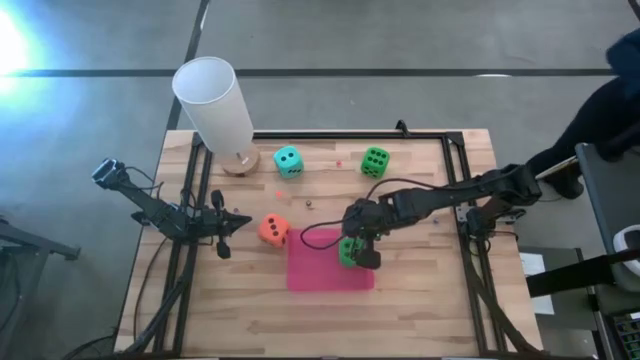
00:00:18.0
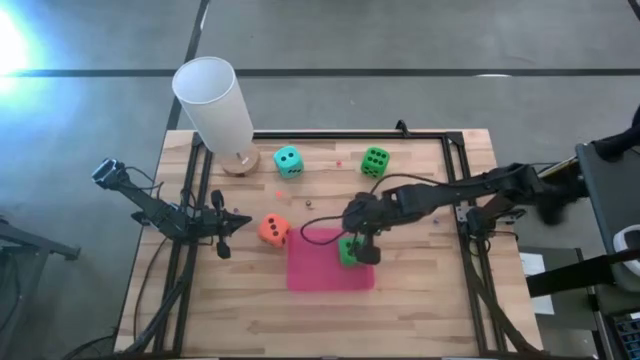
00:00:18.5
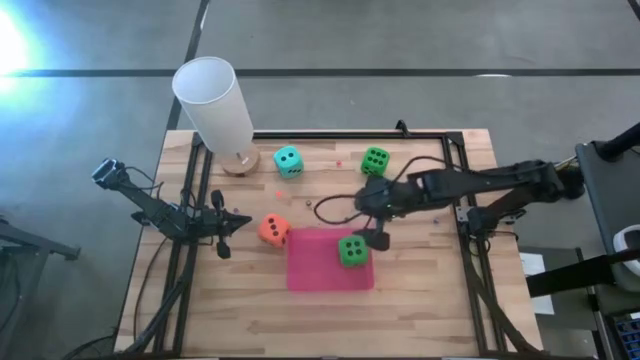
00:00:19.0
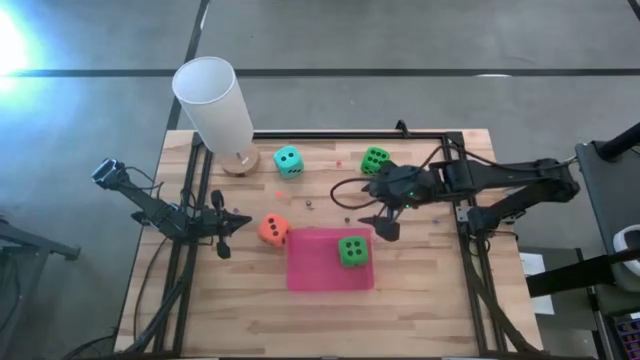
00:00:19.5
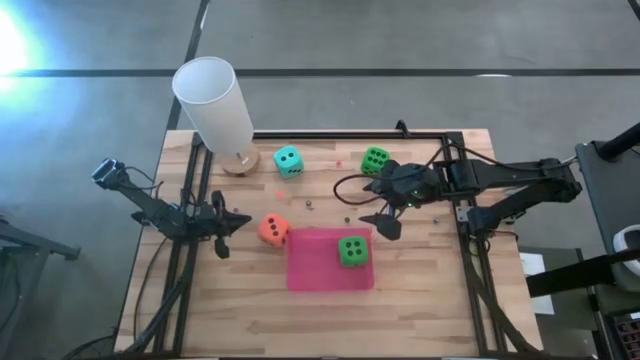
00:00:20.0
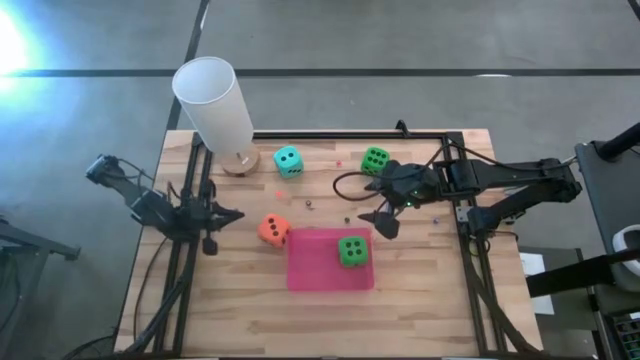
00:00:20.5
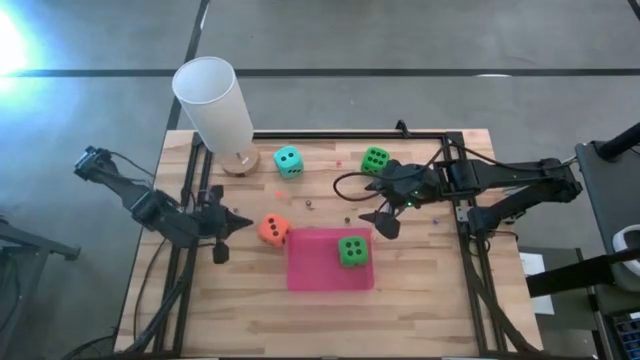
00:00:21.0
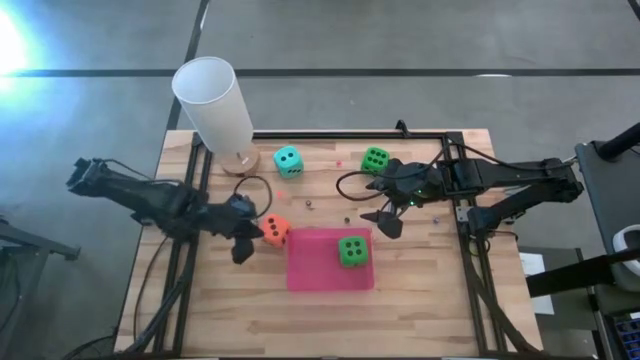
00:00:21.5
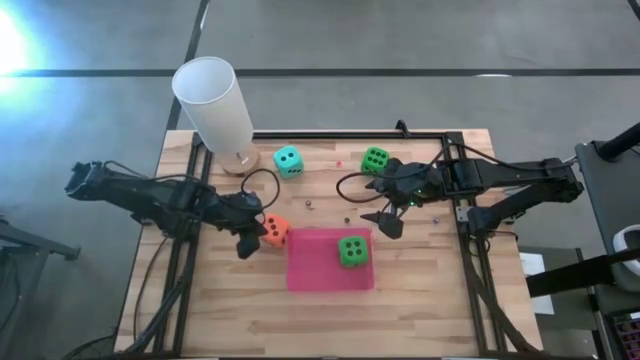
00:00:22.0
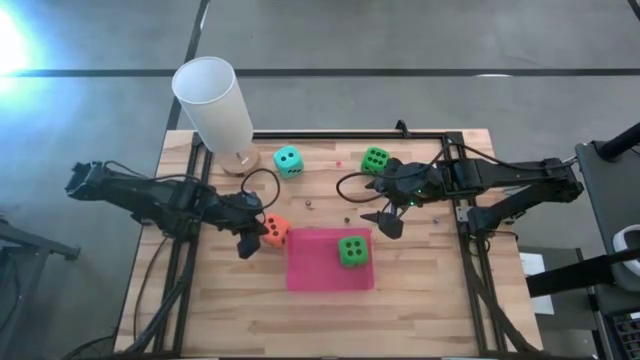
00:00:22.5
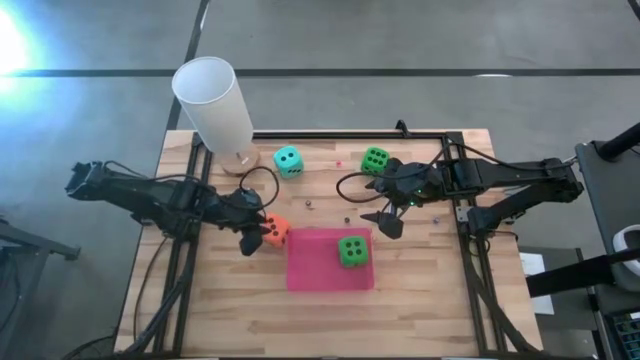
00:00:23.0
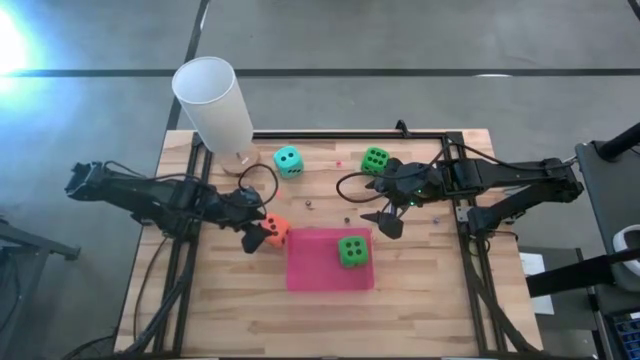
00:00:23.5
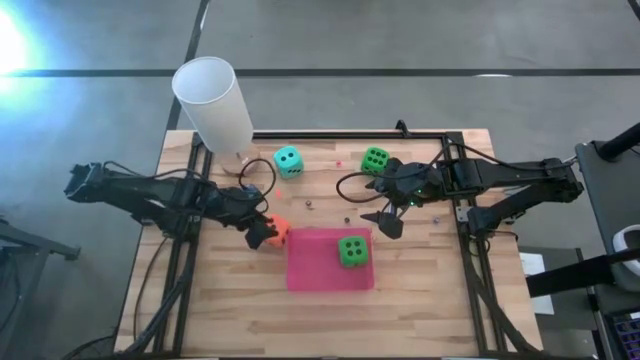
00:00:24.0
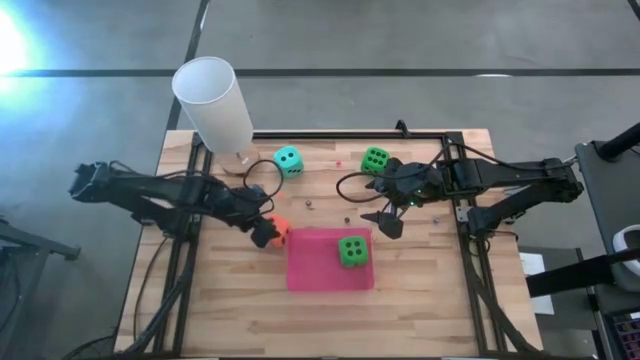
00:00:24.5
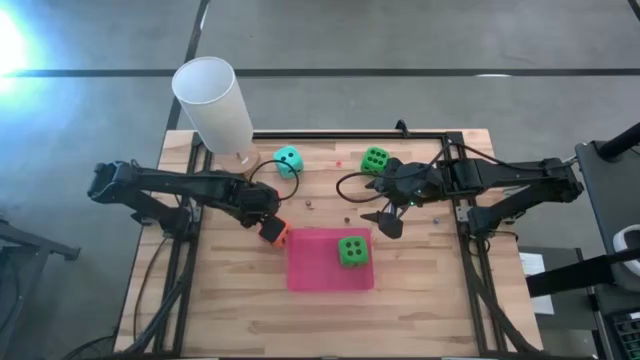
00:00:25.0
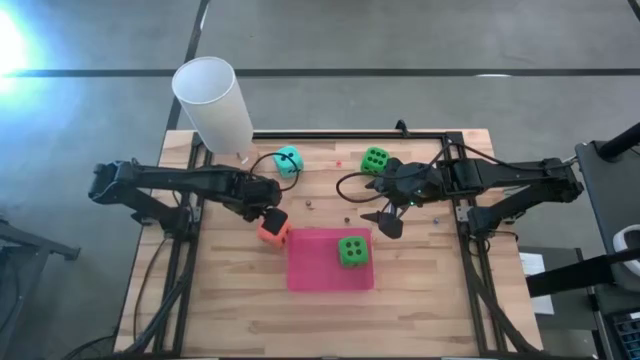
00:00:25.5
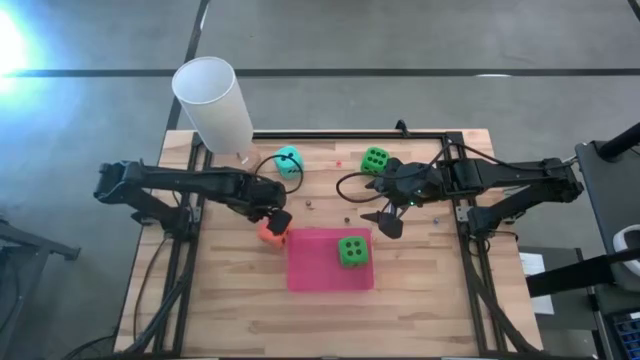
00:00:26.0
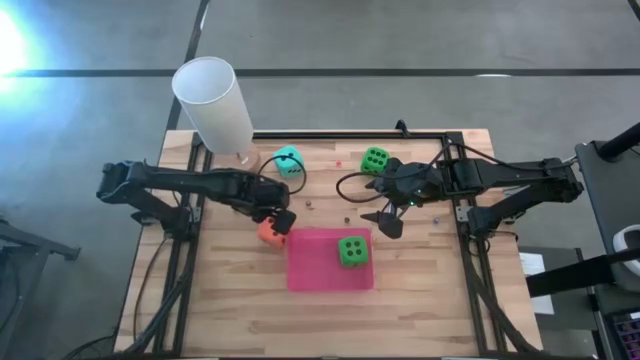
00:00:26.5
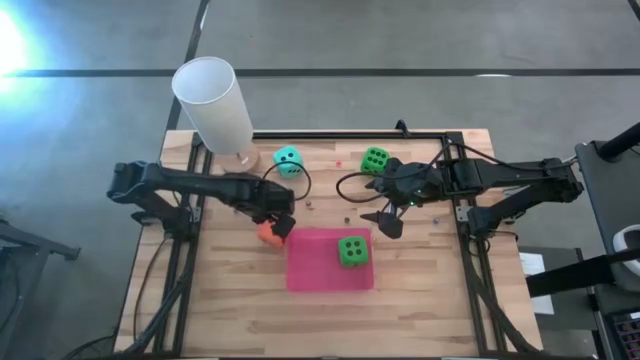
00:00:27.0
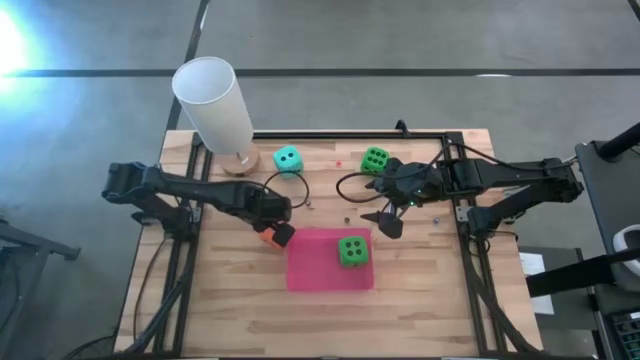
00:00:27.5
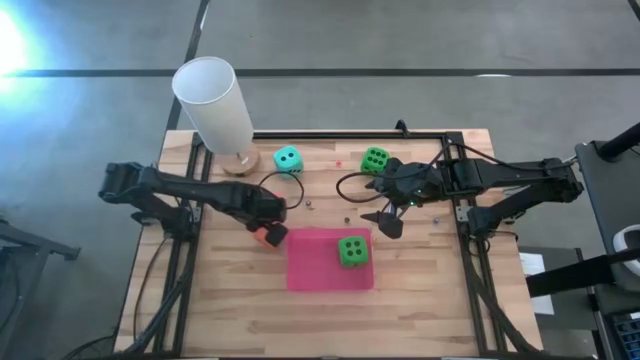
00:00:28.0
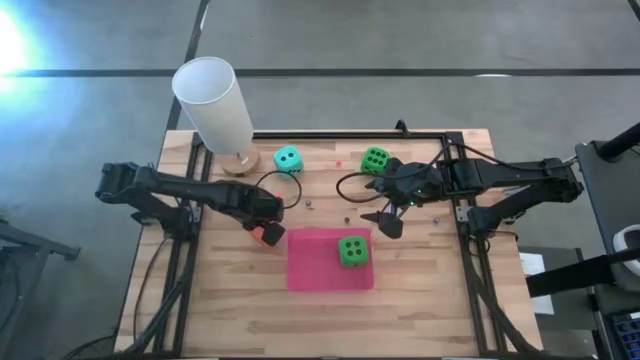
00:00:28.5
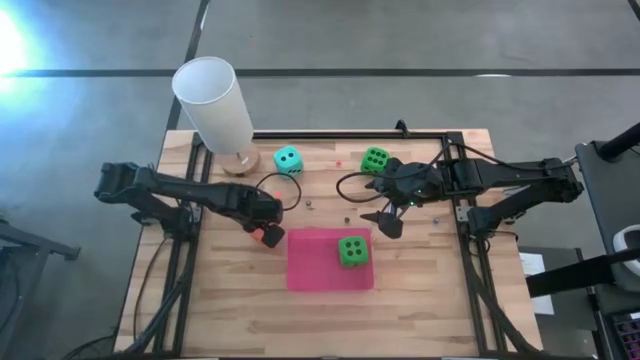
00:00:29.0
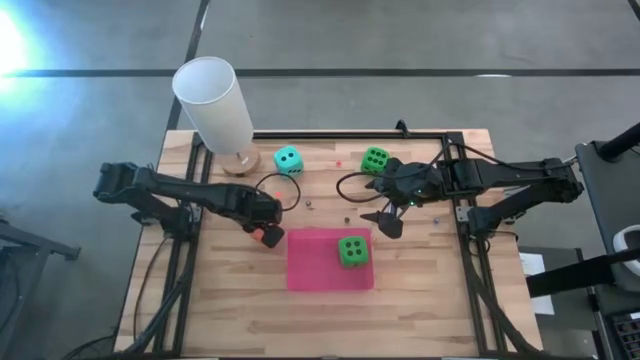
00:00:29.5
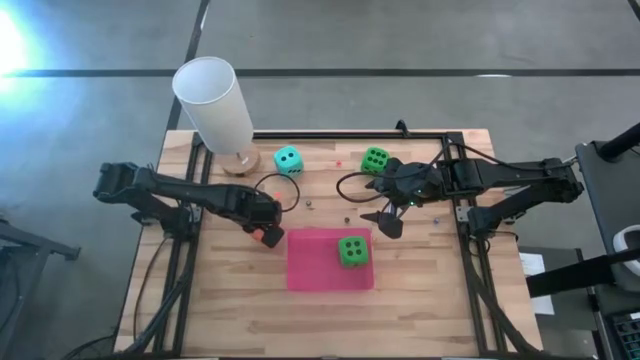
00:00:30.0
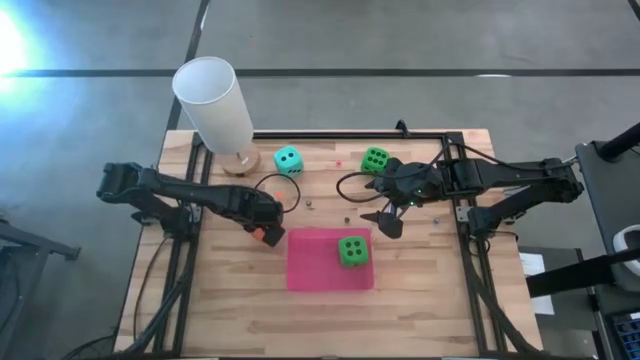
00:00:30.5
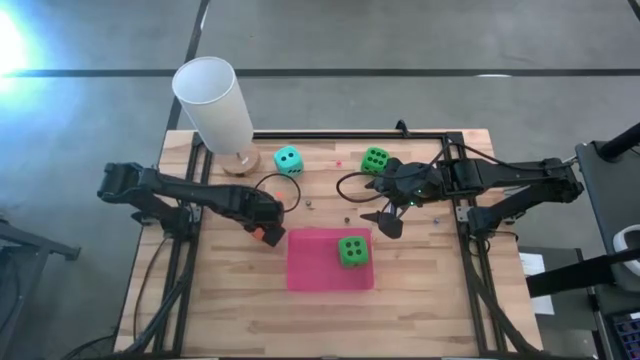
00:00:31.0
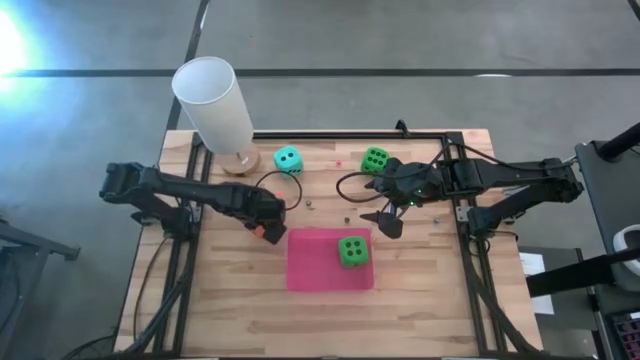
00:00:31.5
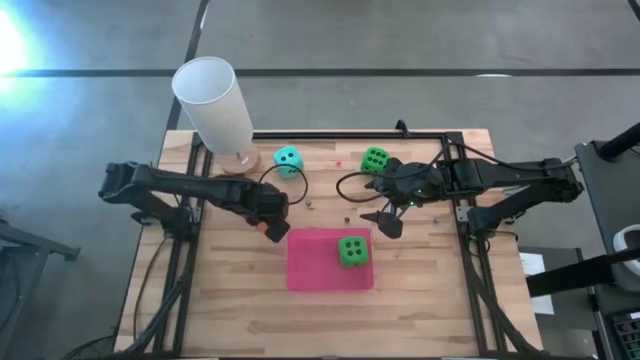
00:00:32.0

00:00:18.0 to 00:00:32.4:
Task: Pick & Place Dice
Put the large orange dice into the pink bin

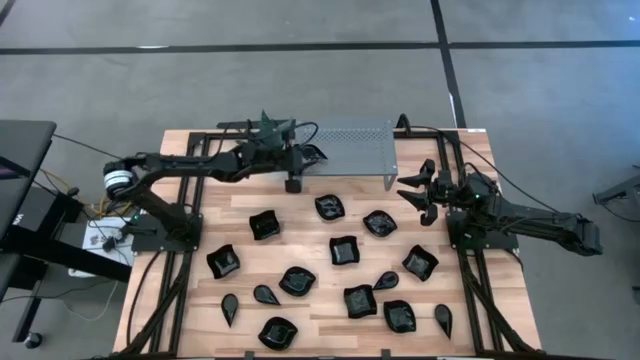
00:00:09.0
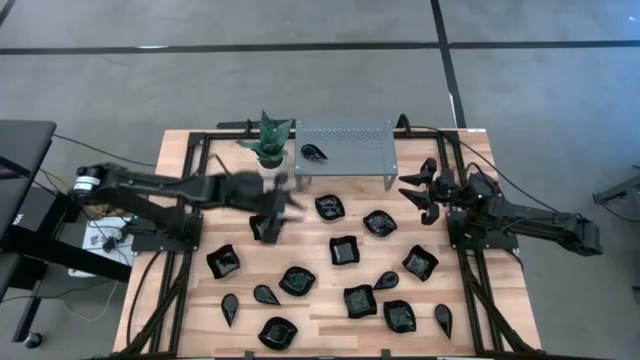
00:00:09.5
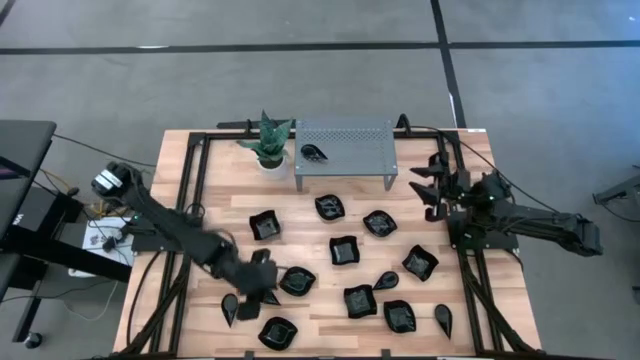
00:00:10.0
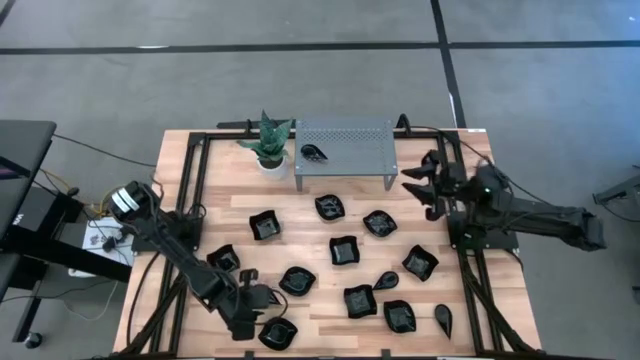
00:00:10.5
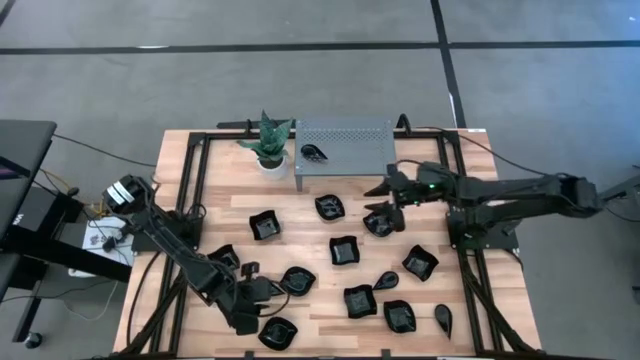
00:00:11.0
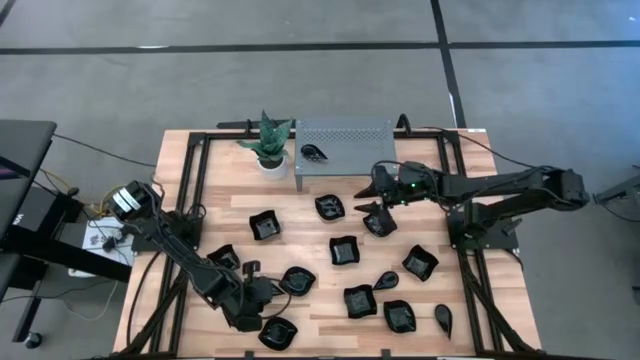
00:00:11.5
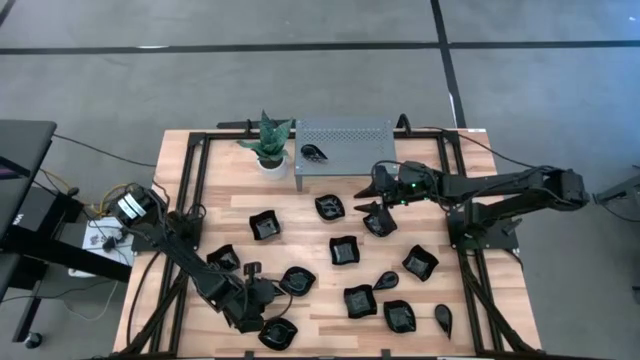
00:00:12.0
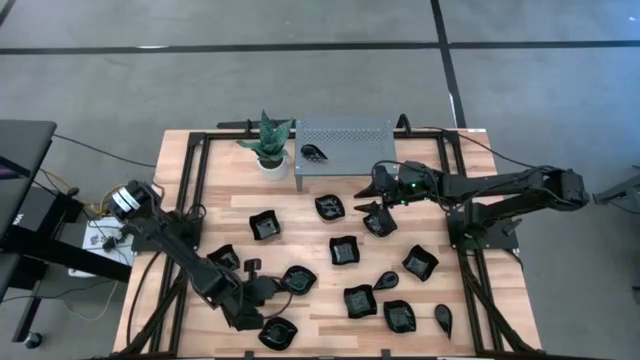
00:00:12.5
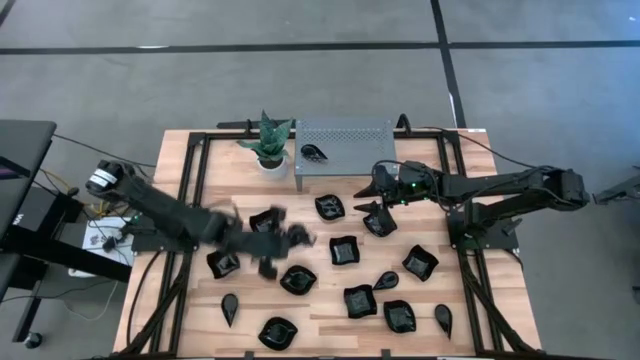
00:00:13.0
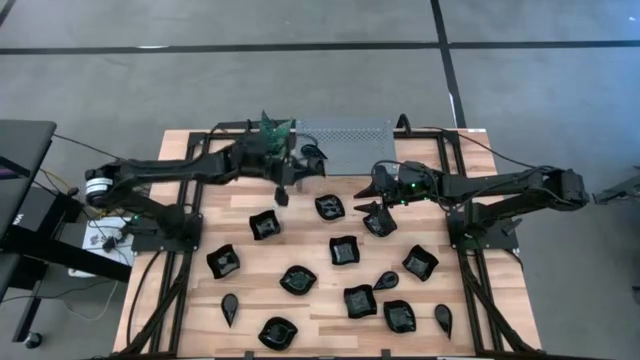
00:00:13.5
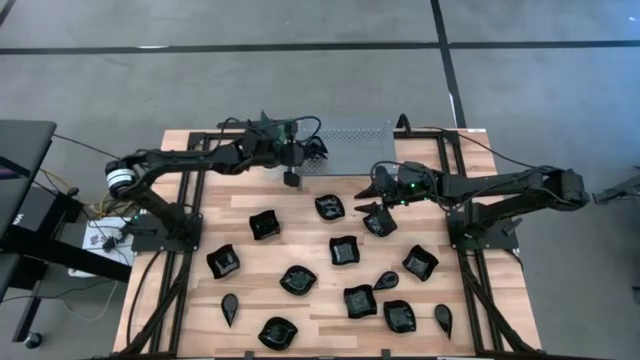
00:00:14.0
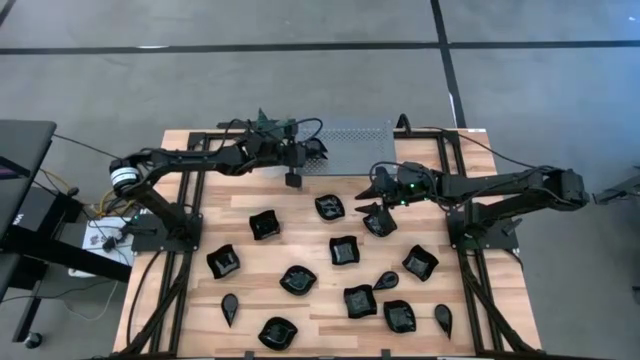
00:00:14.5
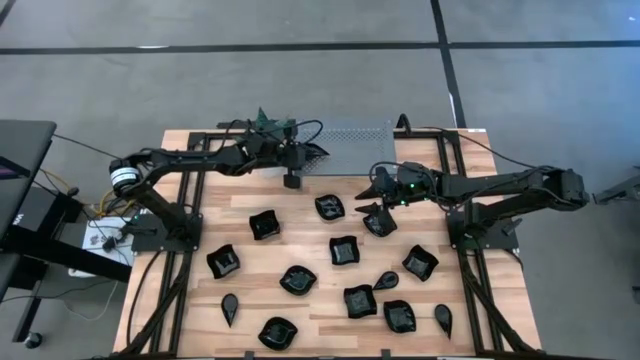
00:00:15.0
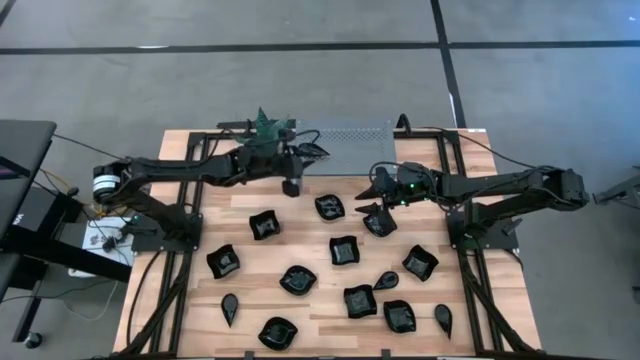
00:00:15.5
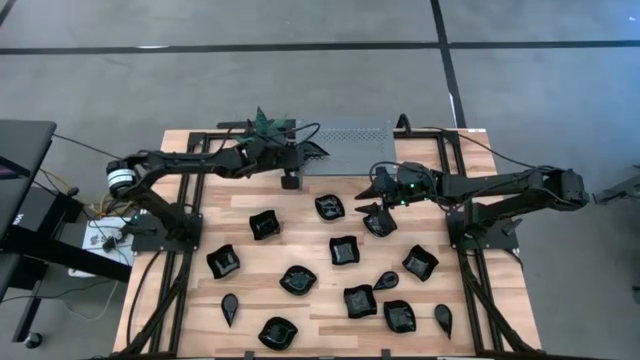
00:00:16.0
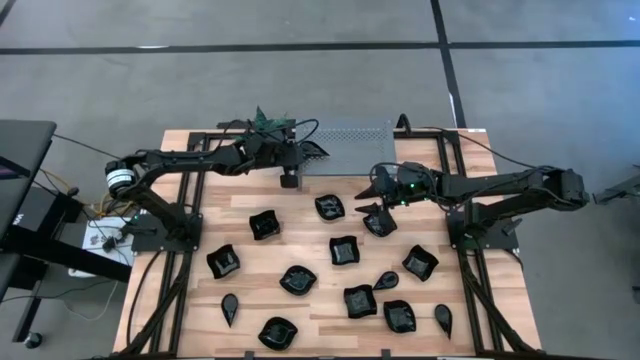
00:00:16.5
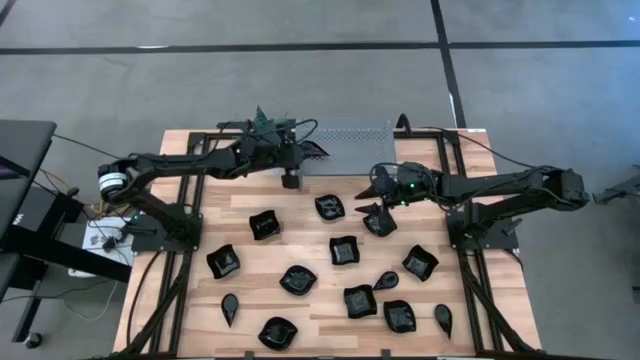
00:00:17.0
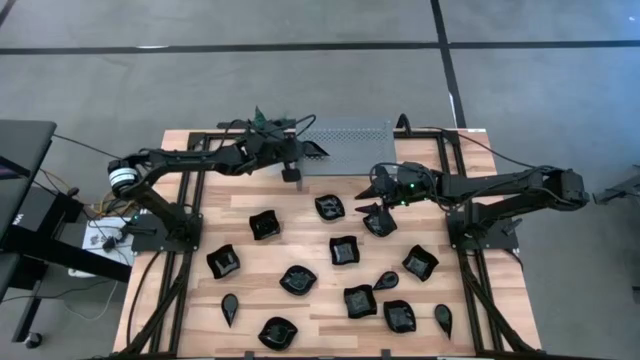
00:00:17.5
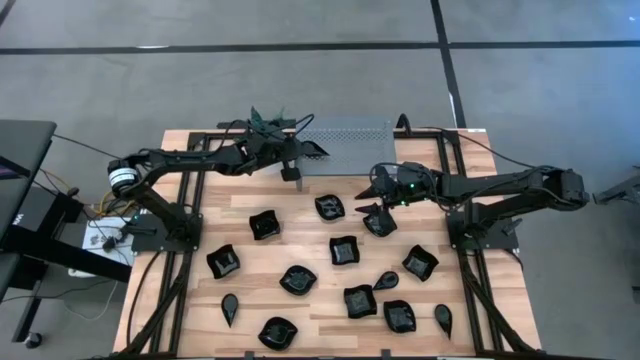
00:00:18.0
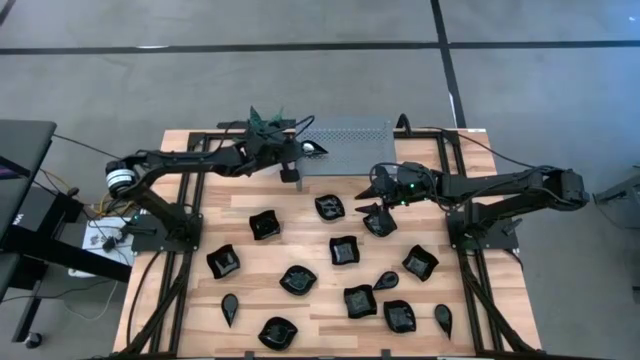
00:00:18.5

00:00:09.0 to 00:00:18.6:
Task: Pick & Place Mini shaped plates
Stack the drop-shaped plate on top of the drop-shaped plate on the shelf
